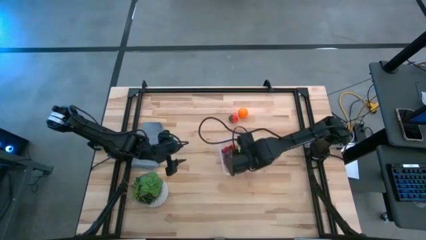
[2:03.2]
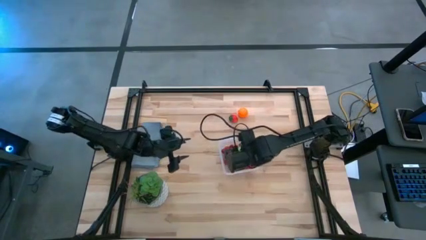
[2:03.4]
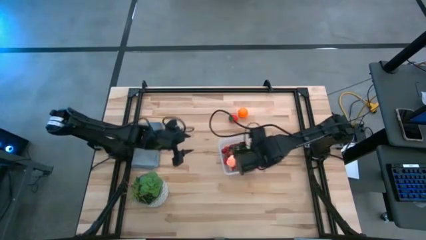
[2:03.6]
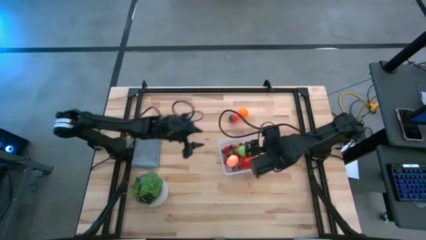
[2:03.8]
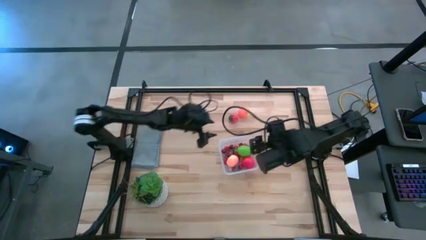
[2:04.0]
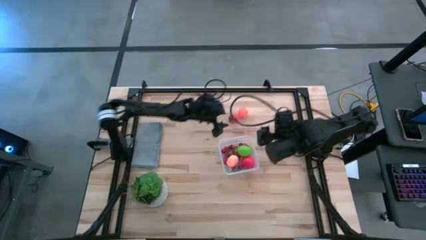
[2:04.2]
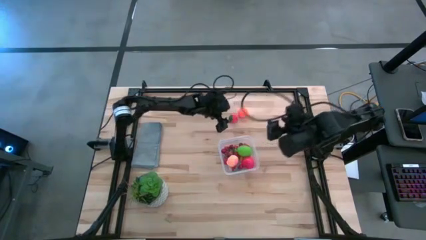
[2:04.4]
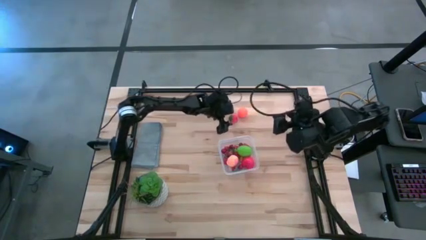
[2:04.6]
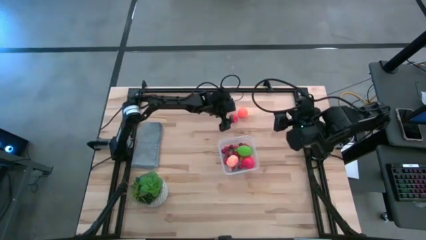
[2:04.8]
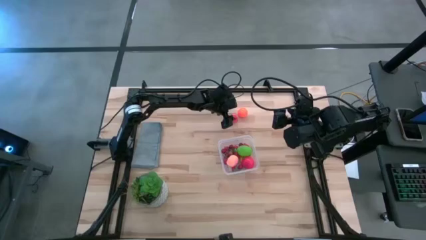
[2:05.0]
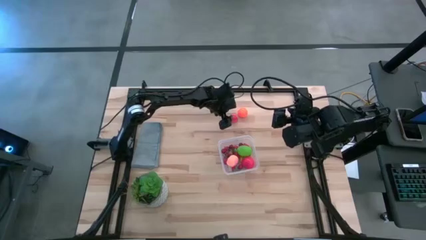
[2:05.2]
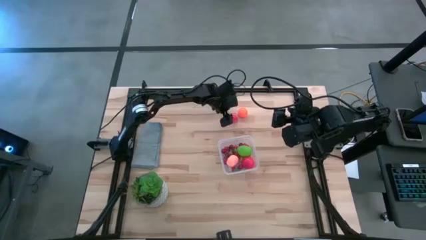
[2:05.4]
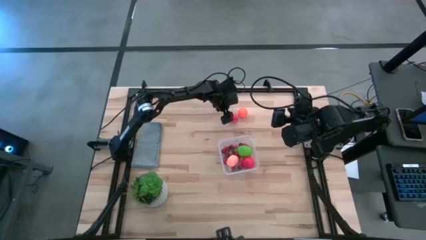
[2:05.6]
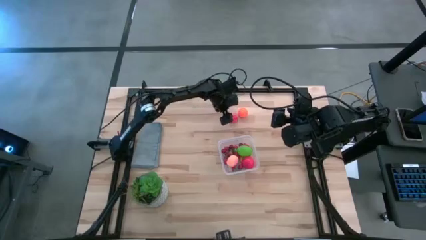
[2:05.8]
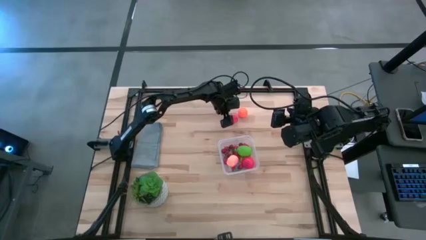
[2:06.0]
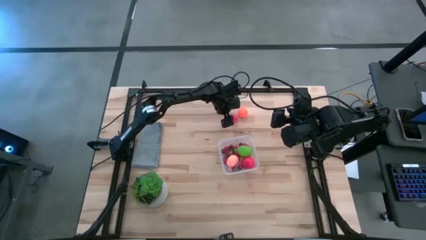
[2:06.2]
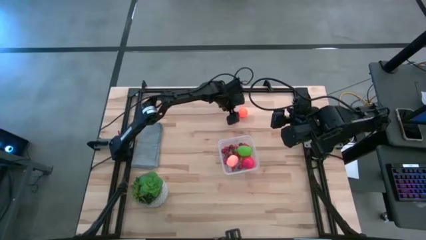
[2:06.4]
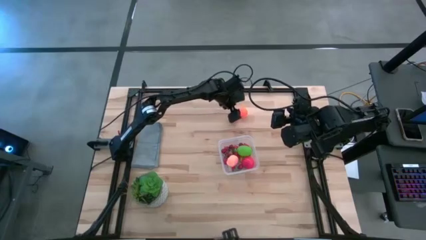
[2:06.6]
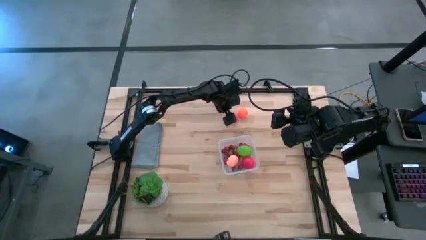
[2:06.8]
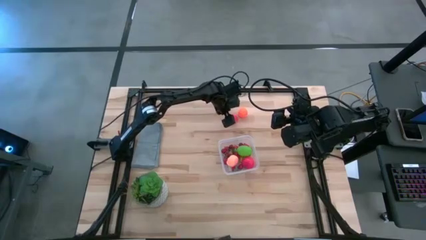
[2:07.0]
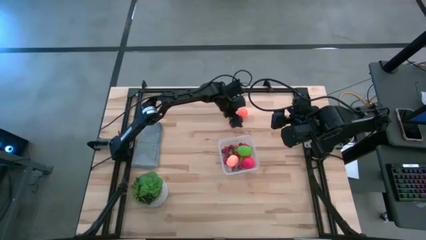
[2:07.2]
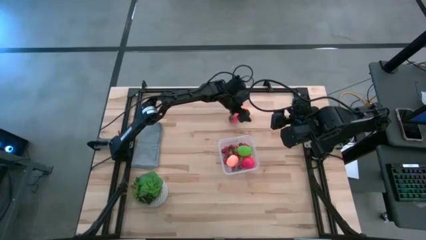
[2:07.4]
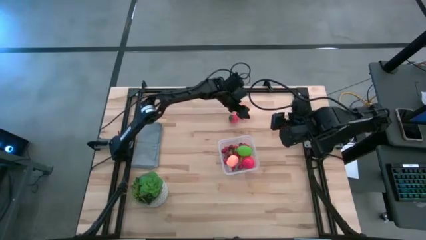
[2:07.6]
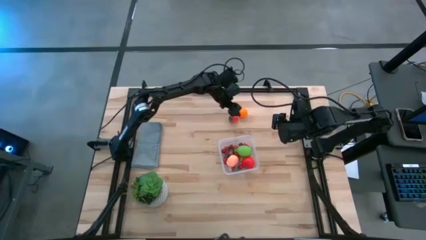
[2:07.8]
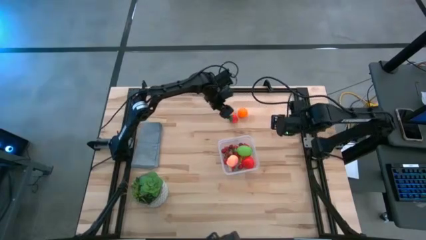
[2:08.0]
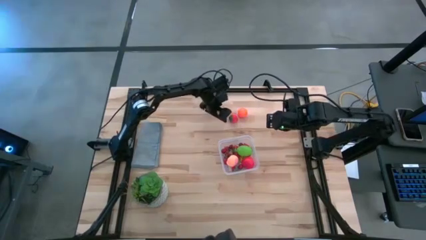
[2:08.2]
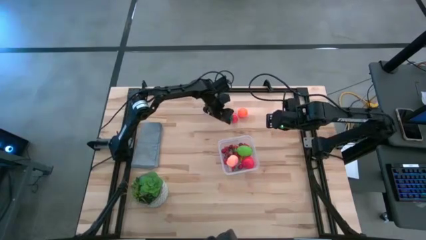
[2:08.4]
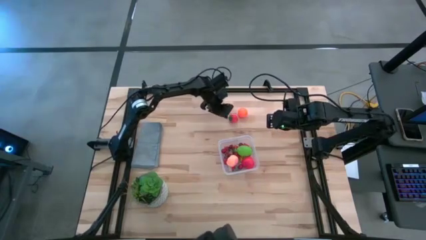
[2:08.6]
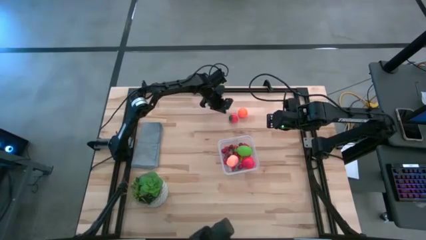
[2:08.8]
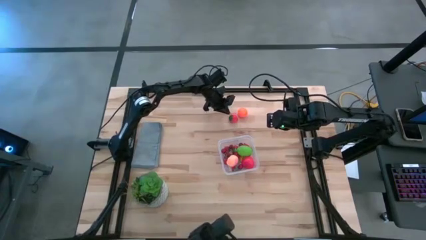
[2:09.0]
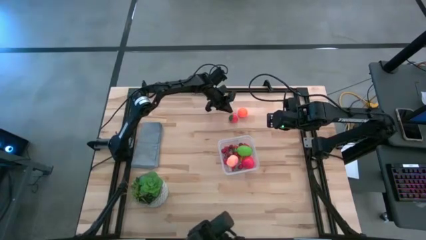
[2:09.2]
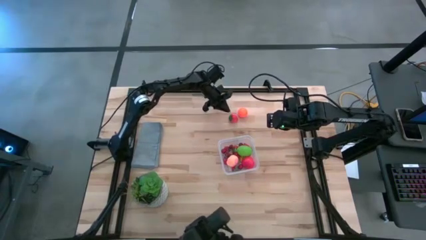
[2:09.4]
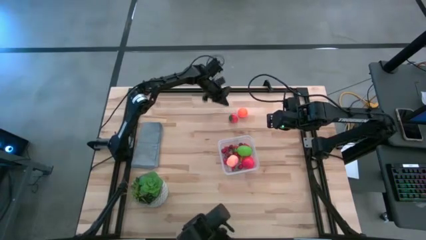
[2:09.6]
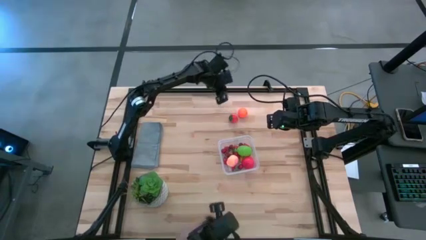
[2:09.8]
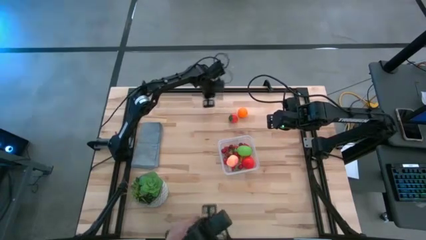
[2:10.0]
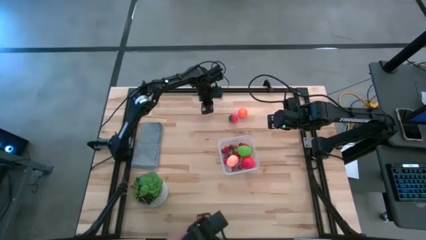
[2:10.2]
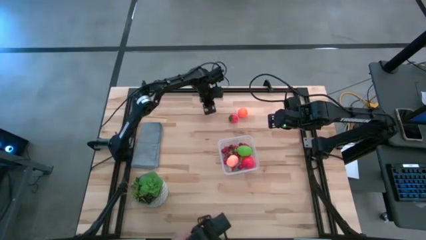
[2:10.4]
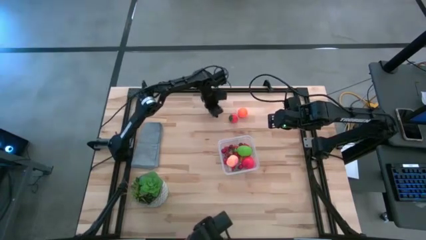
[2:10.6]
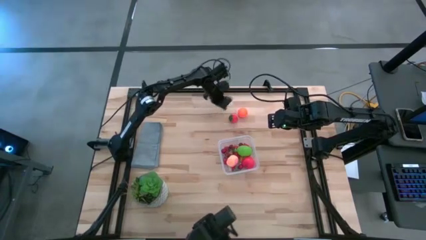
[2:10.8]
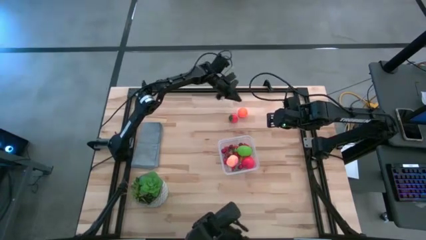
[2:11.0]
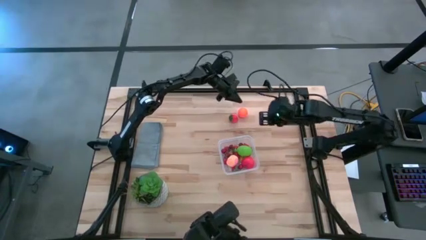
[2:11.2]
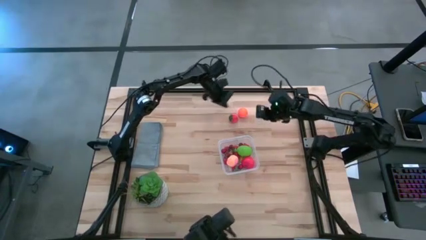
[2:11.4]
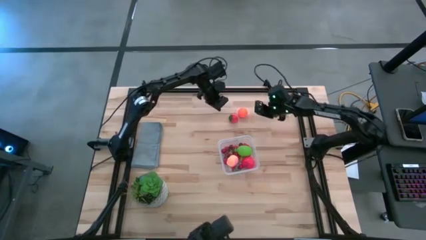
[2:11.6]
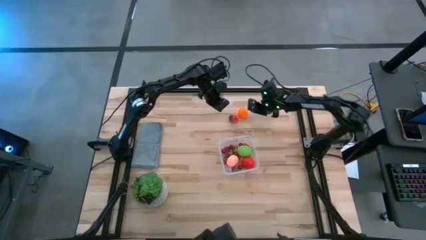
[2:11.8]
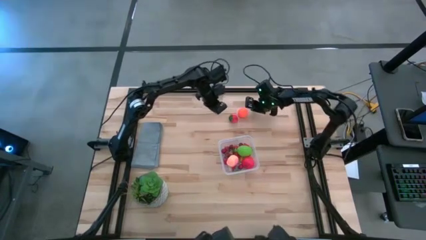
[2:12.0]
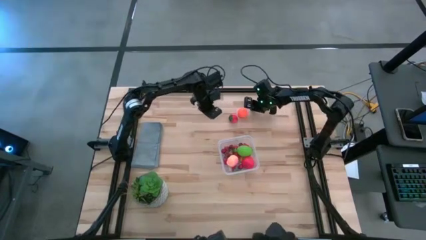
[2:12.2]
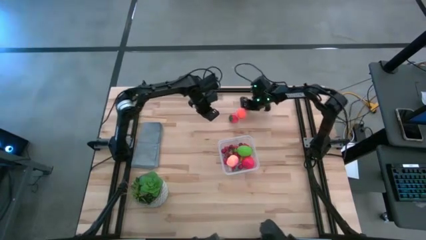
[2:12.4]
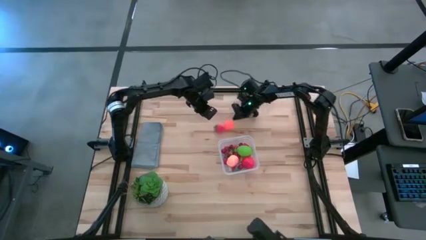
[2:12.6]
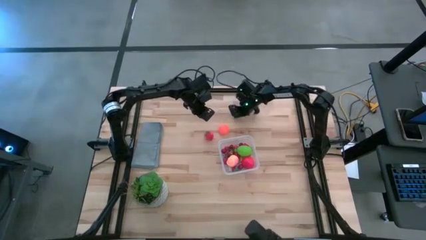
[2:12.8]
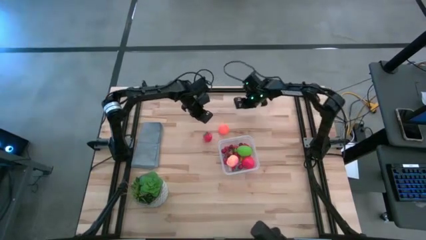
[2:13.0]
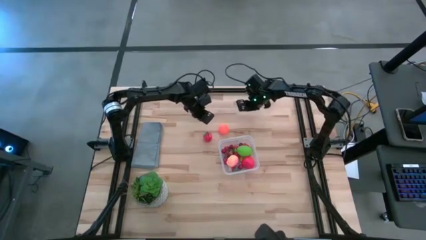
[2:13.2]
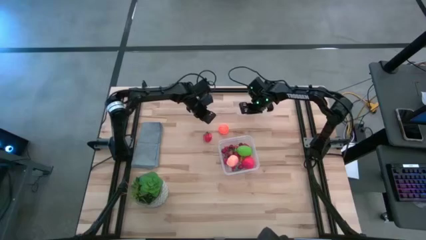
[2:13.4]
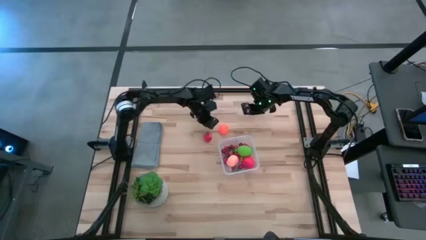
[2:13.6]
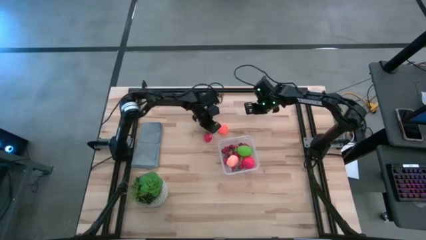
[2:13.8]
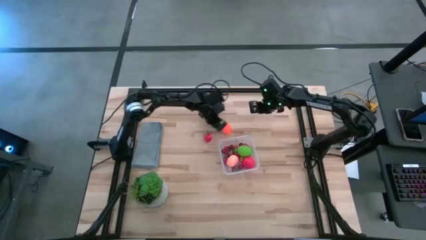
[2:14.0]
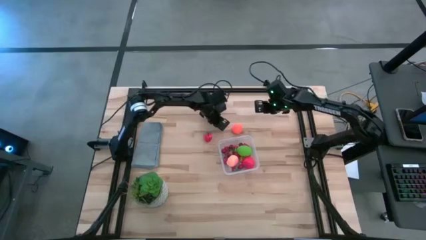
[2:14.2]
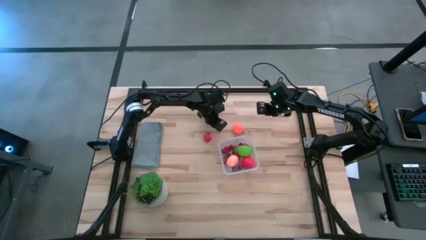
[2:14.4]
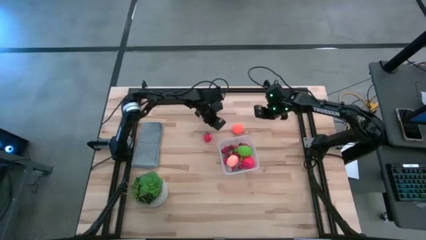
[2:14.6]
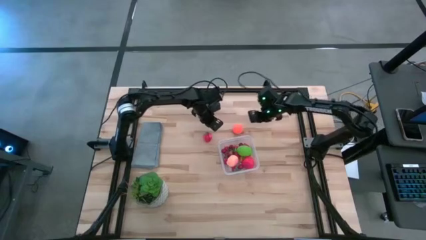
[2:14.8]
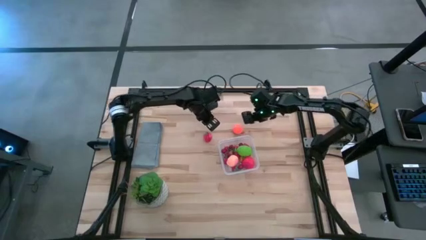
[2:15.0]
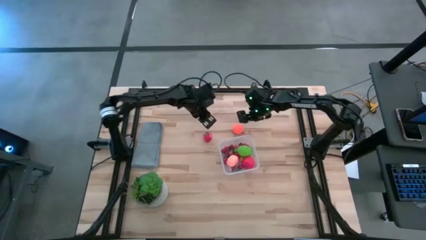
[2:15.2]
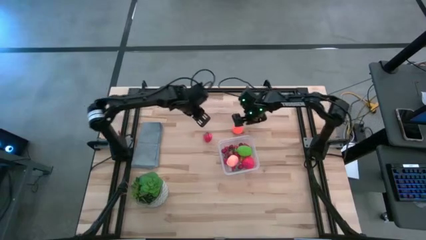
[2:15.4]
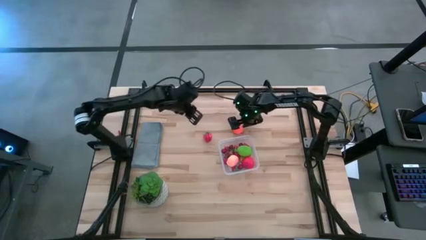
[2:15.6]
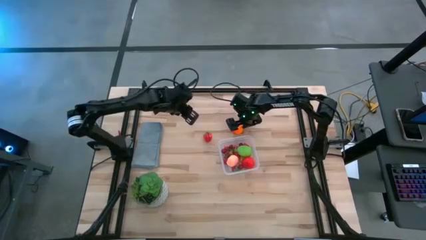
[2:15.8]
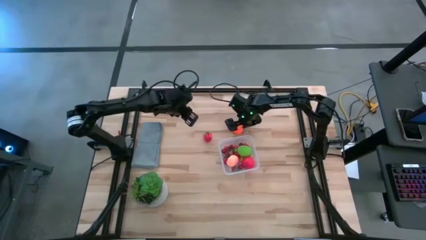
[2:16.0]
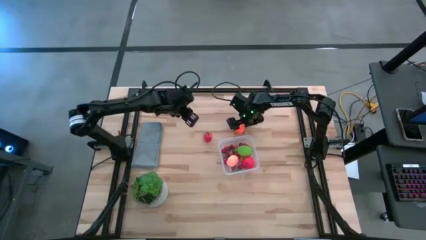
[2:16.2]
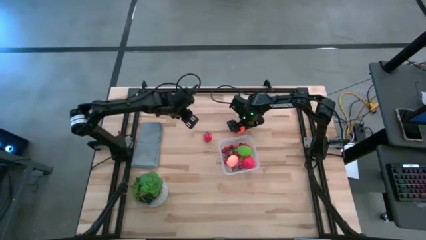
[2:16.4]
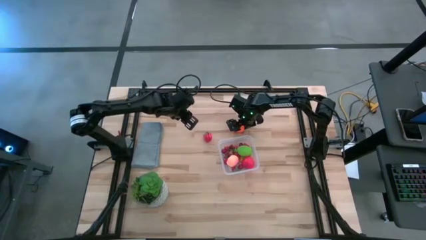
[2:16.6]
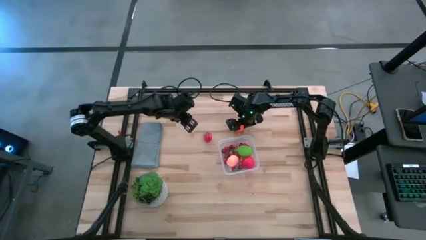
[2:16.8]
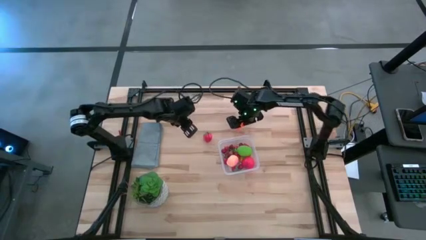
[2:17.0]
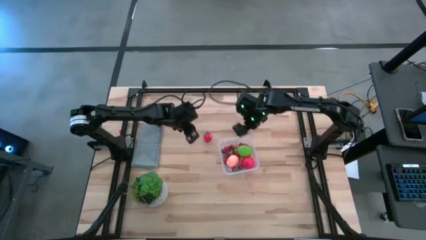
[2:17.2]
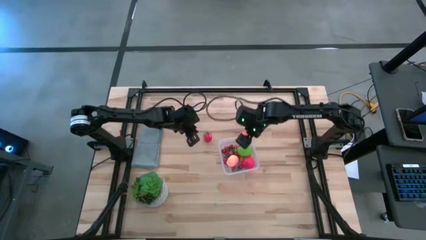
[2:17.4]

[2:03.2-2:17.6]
Task: Pick and placing Produce into tupperware
Put the tangerine into the transparent bin

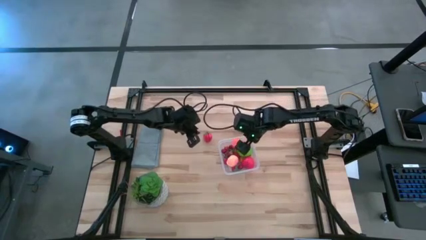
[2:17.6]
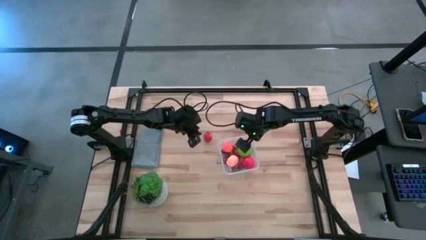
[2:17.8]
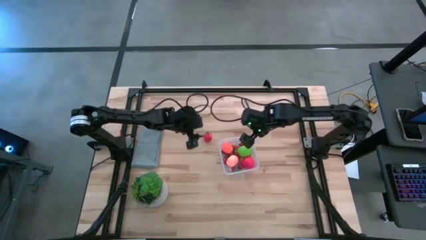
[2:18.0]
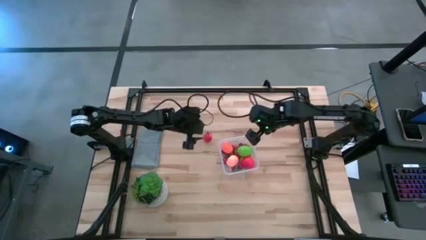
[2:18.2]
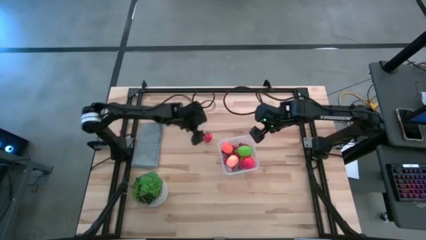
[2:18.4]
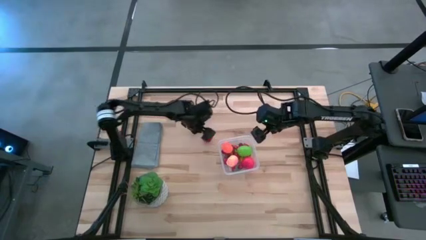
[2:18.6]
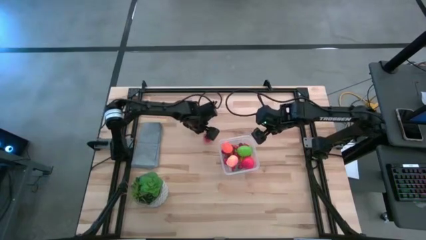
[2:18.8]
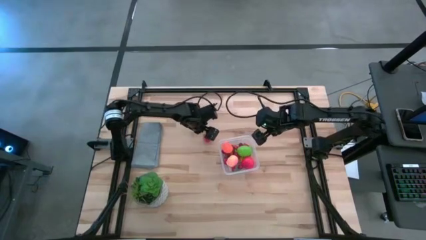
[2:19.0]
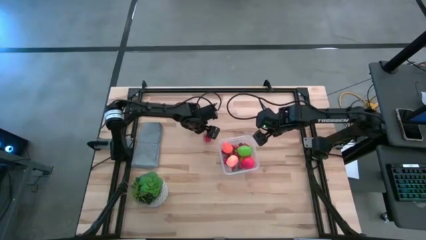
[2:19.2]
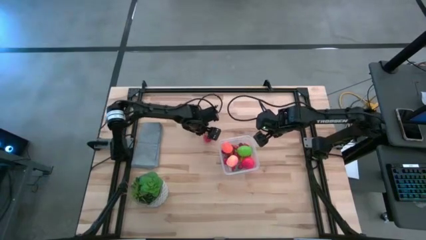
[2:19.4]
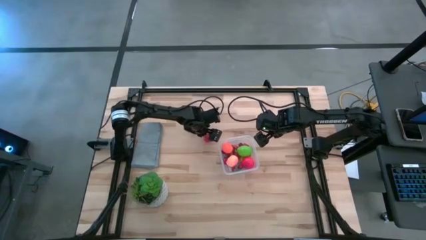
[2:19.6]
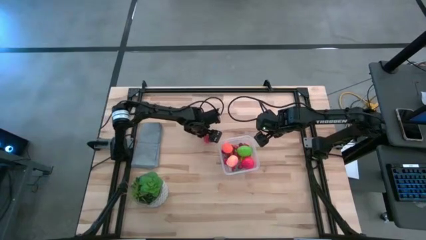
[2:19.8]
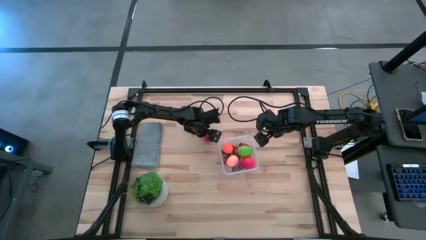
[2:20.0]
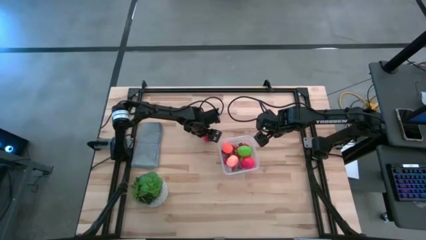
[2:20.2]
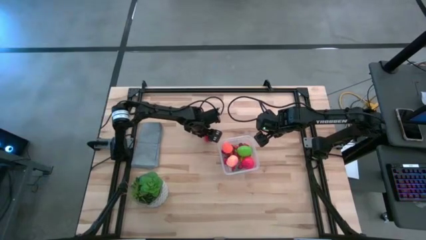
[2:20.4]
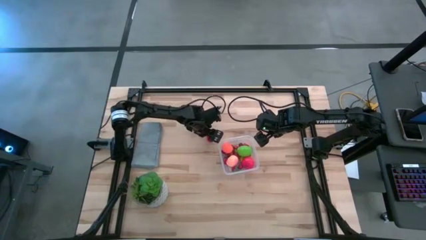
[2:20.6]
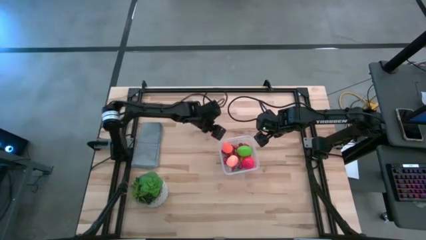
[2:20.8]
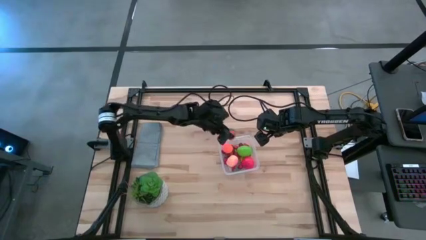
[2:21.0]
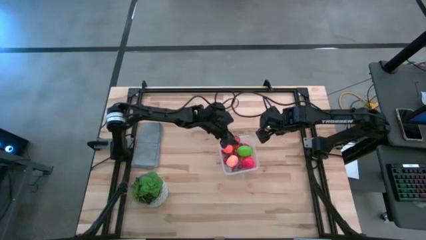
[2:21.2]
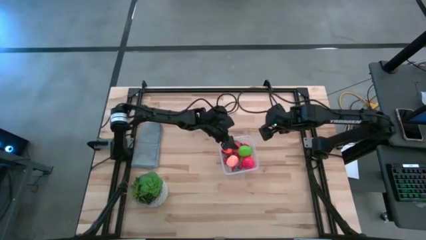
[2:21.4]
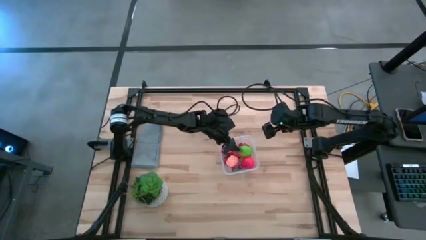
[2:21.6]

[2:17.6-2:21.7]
Put the strawberry into the bin
